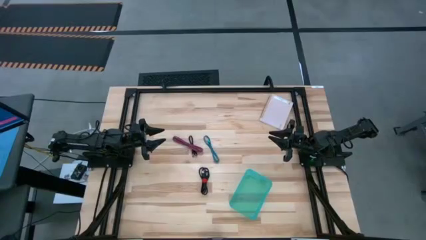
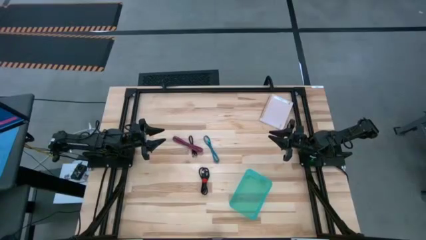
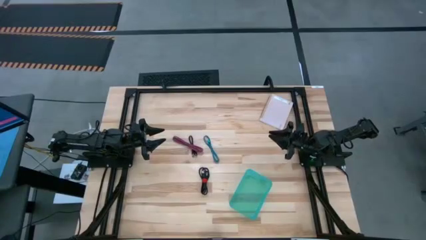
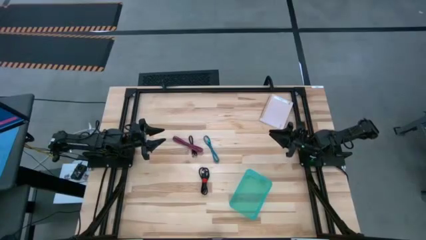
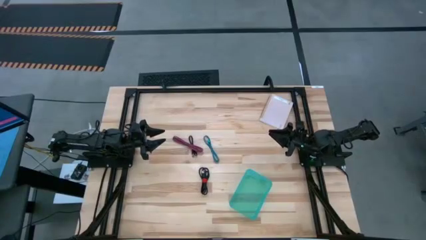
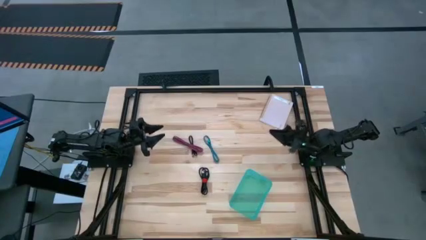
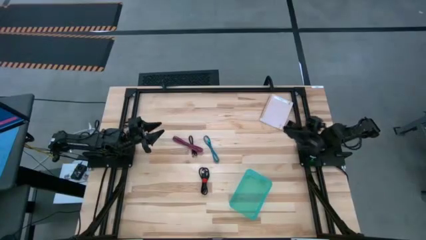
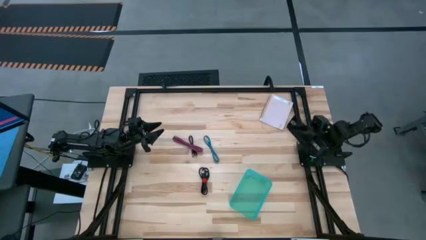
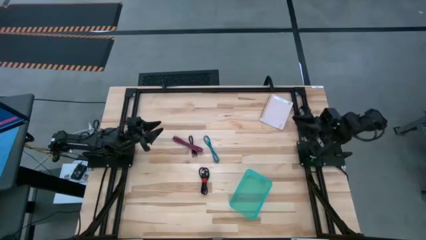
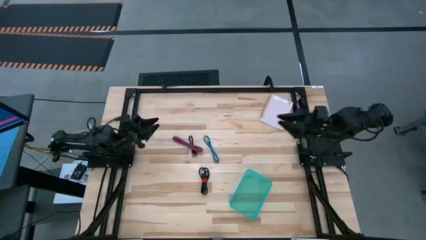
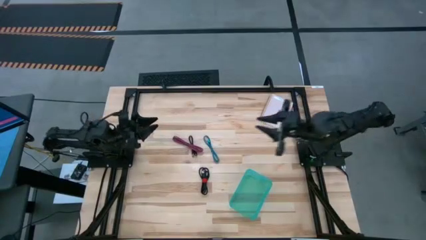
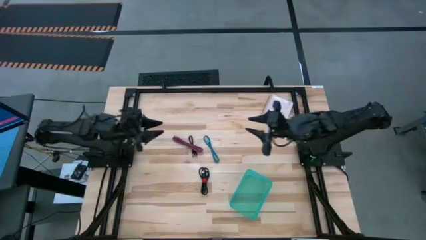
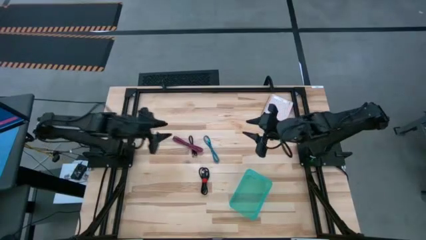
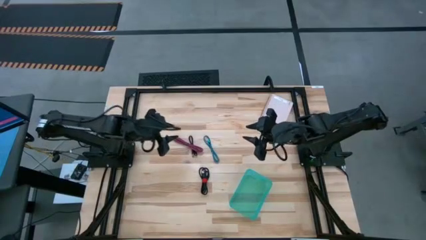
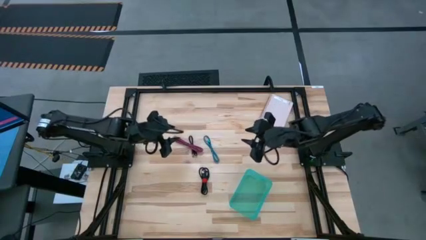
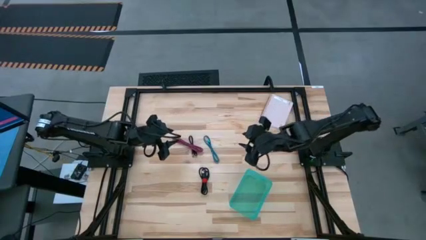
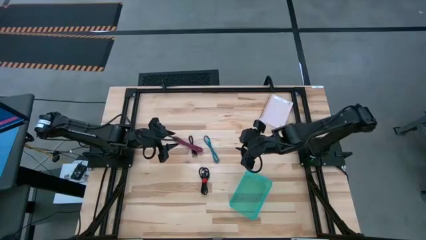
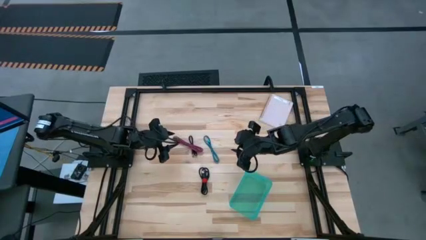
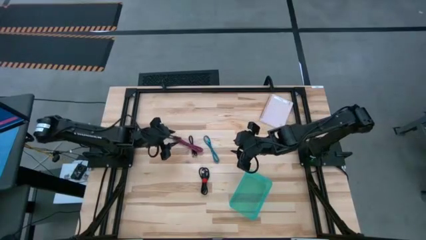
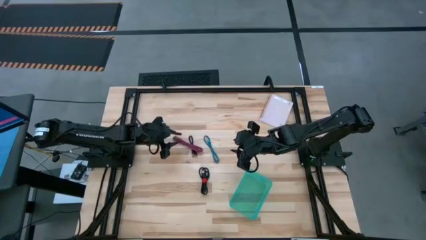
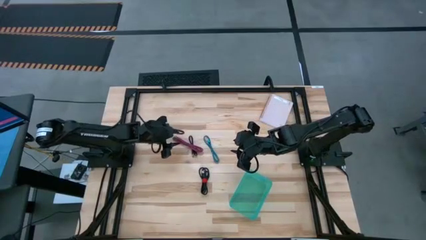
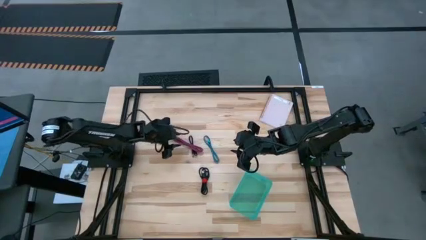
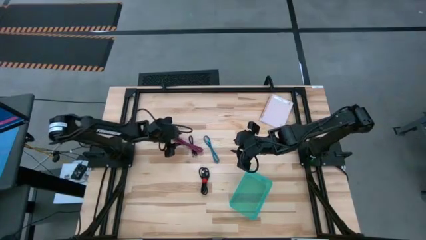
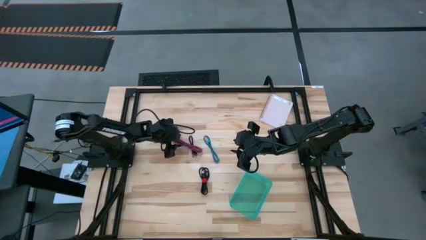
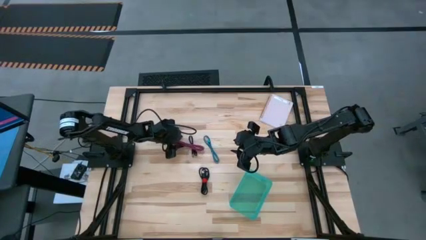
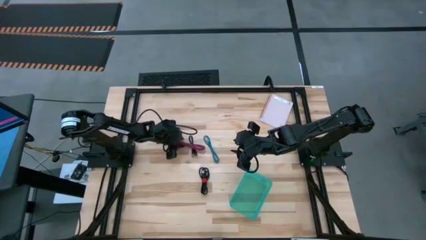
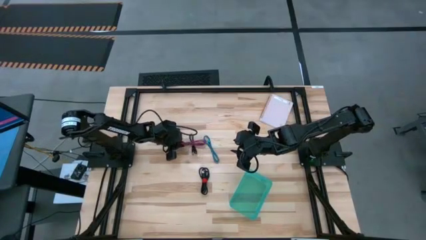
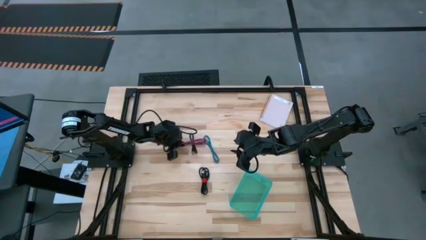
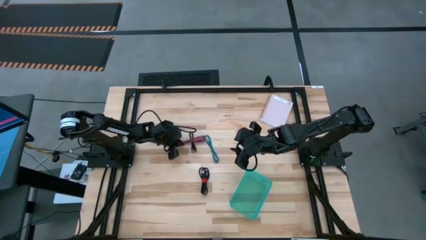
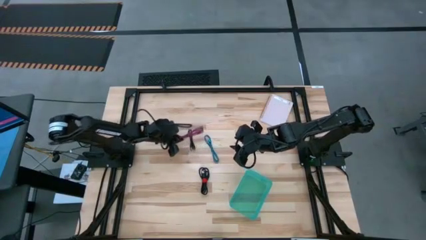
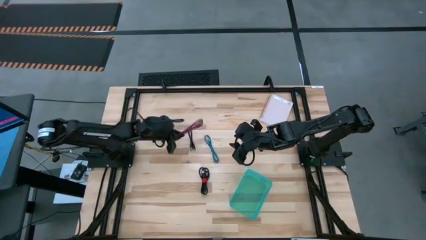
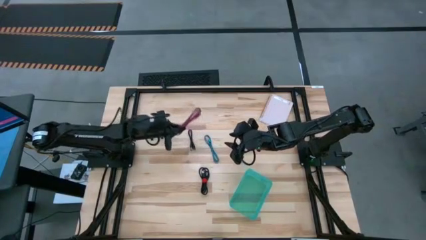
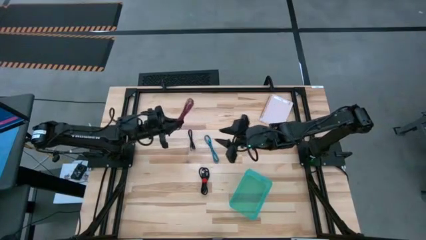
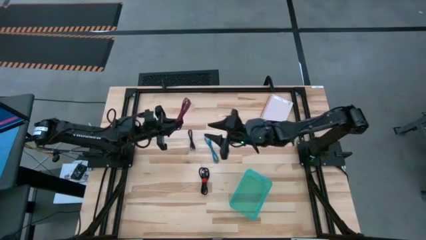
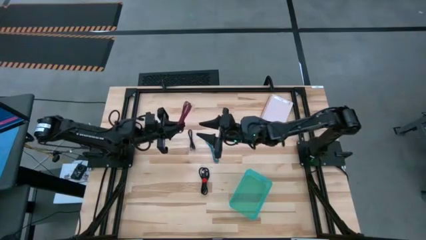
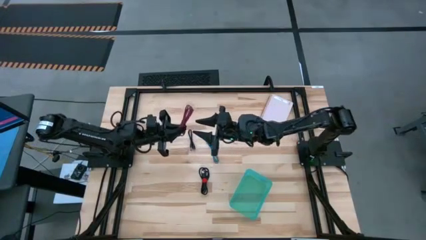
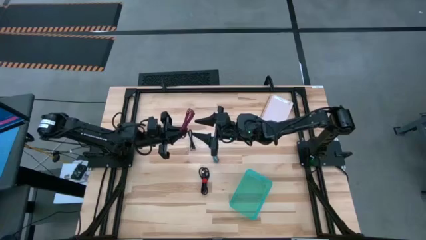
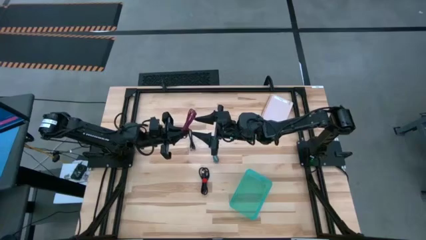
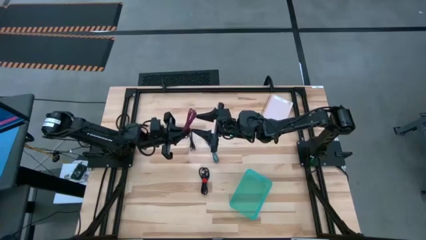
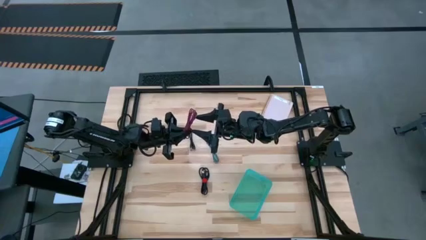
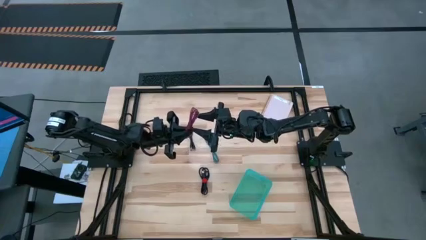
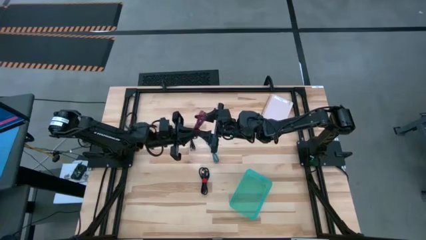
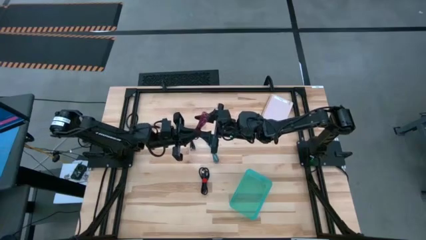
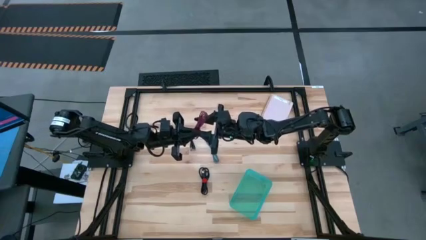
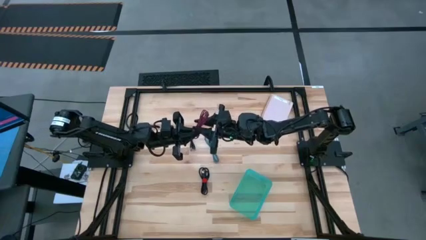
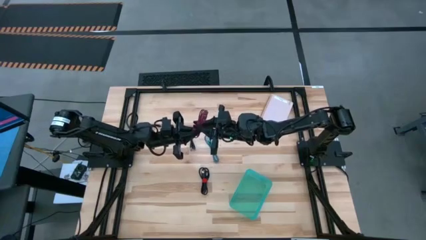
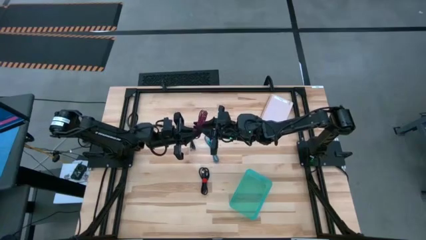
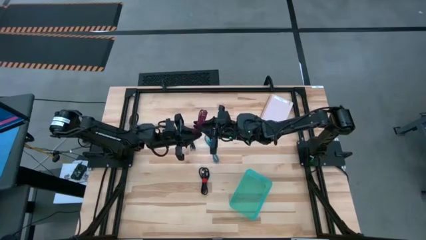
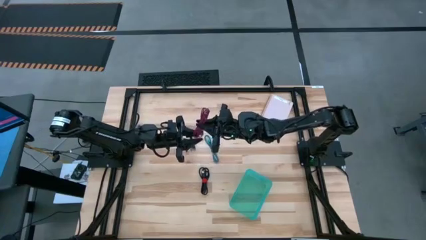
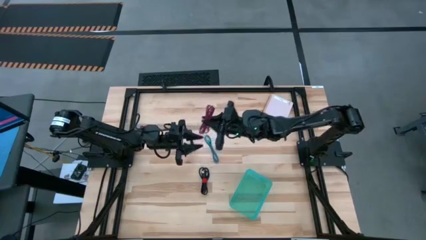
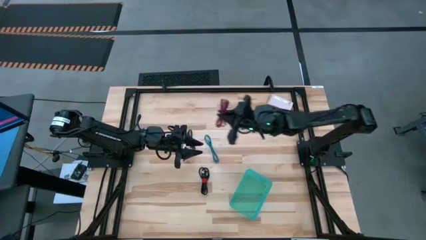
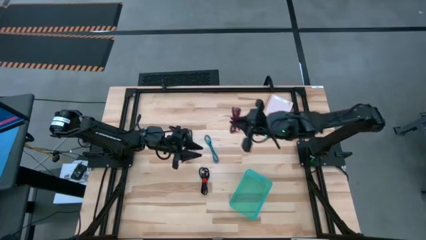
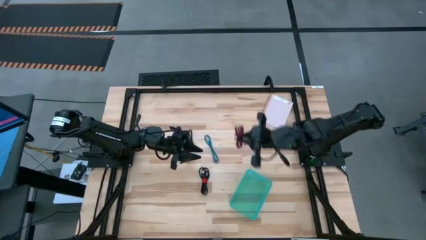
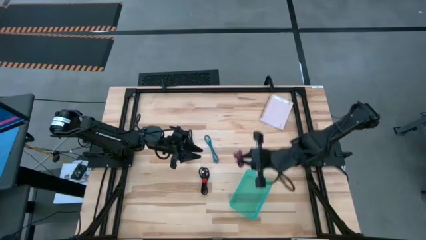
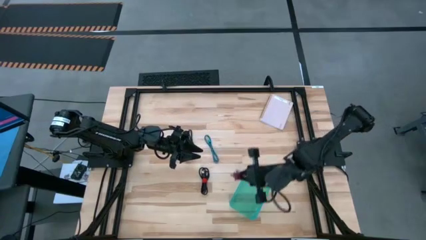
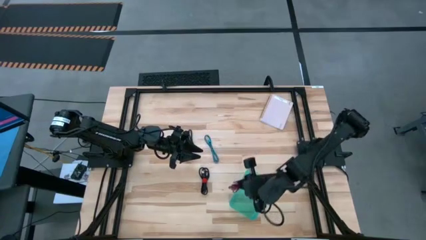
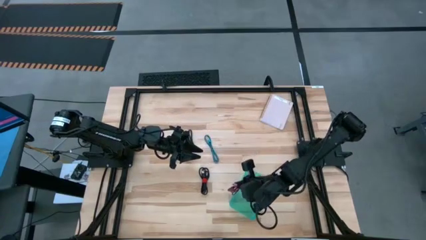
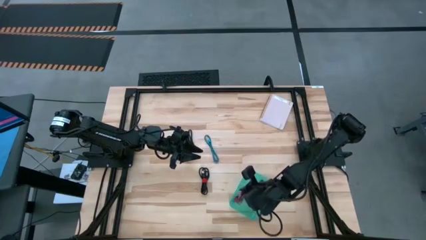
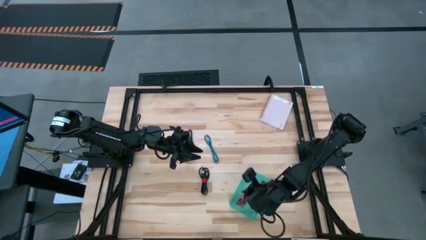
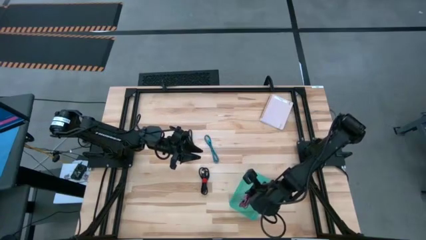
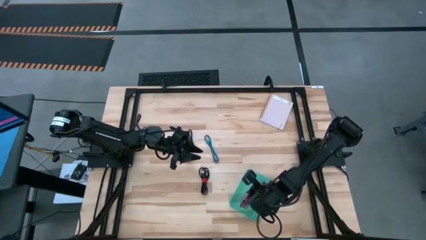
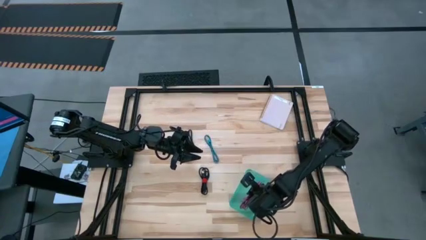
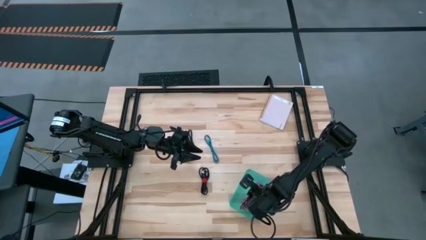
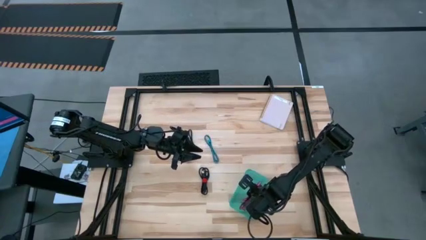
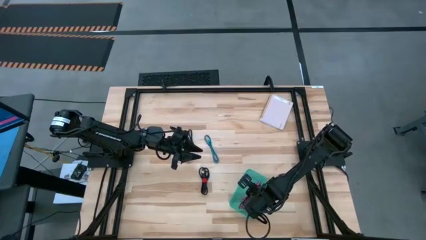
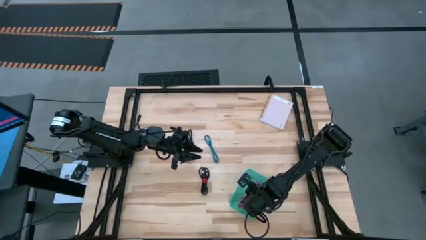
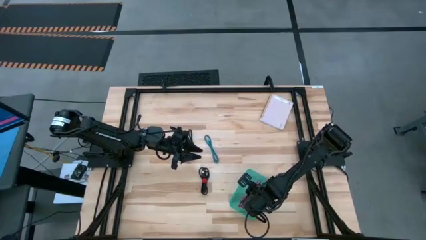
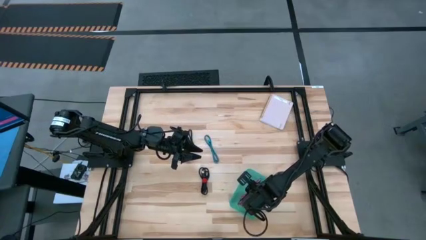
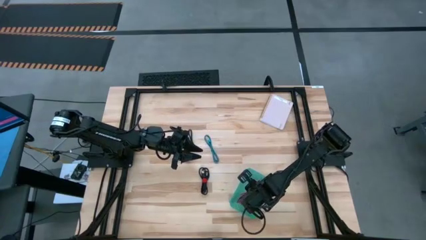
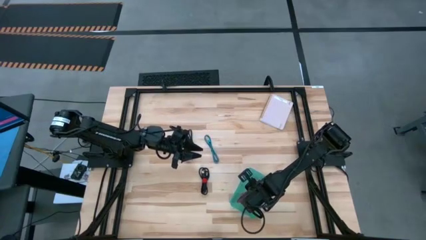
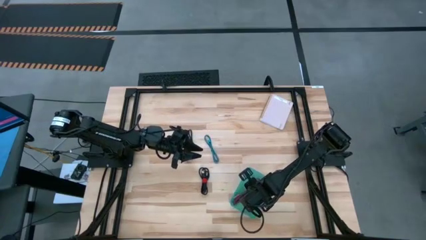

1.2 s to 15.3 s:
Task: Pick and place USB-C Cables
Put the pink usb cable into the bin
